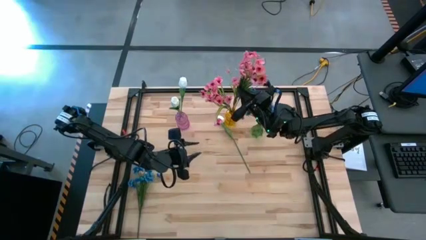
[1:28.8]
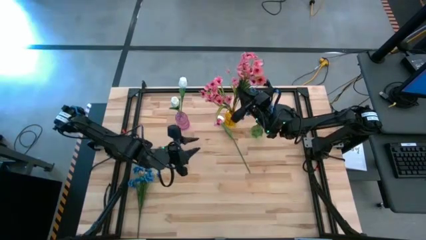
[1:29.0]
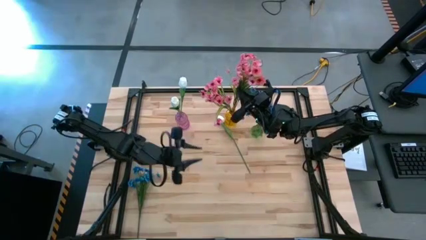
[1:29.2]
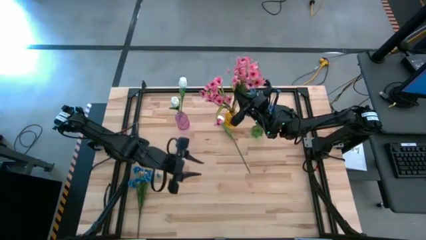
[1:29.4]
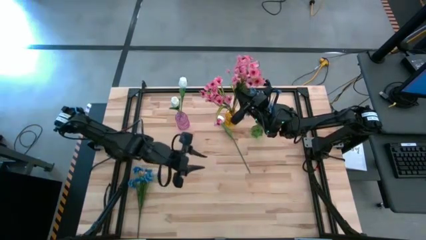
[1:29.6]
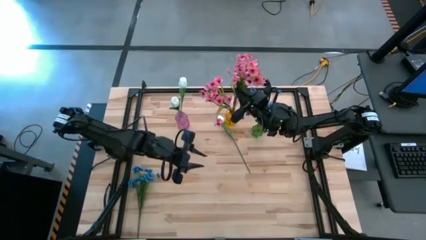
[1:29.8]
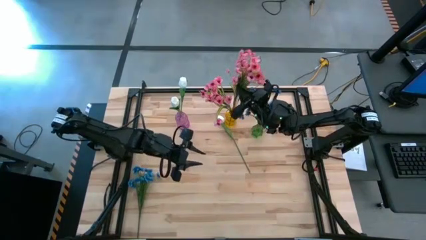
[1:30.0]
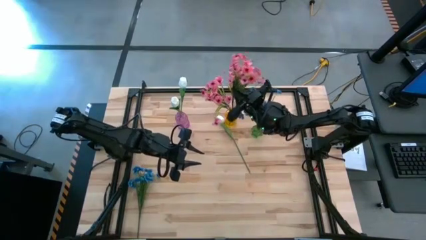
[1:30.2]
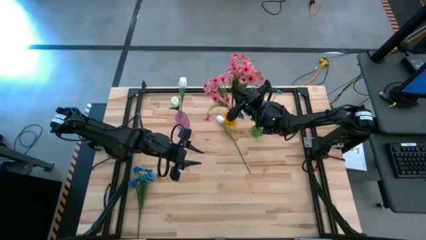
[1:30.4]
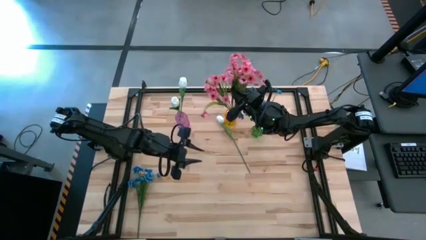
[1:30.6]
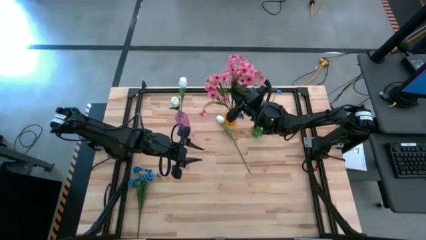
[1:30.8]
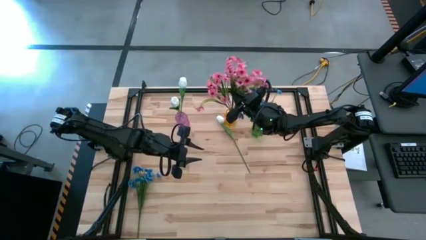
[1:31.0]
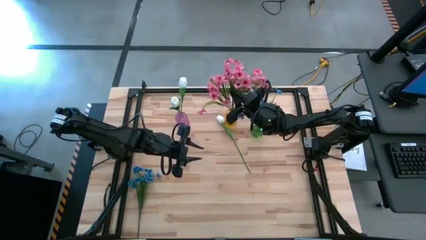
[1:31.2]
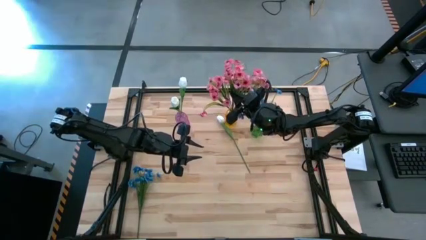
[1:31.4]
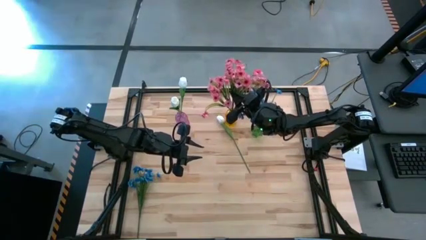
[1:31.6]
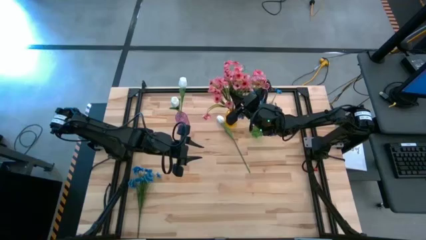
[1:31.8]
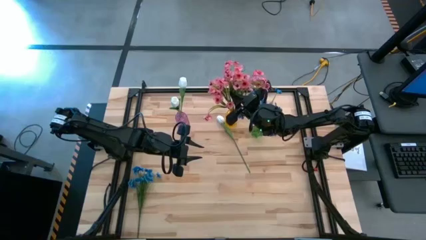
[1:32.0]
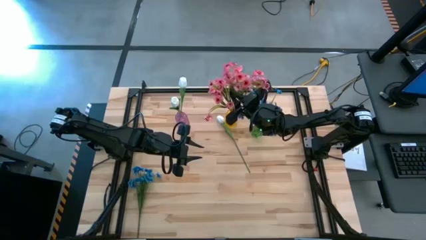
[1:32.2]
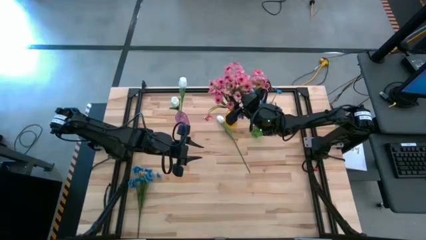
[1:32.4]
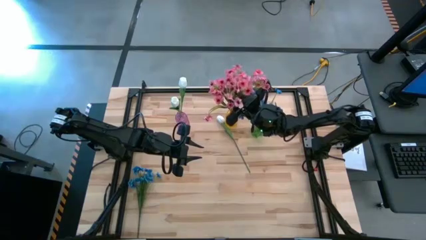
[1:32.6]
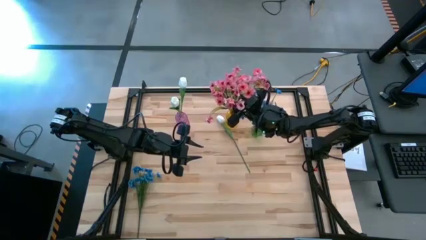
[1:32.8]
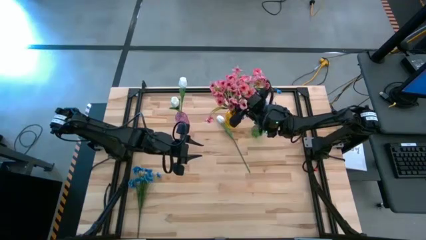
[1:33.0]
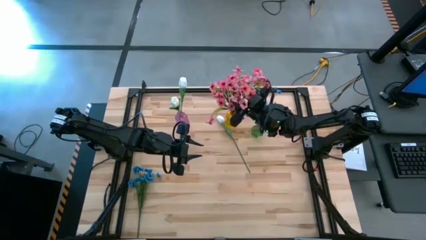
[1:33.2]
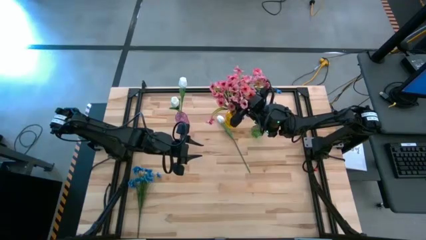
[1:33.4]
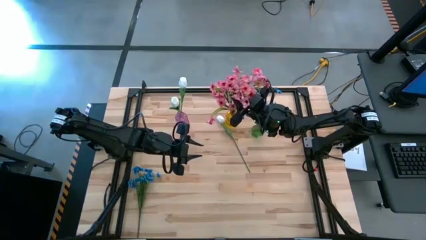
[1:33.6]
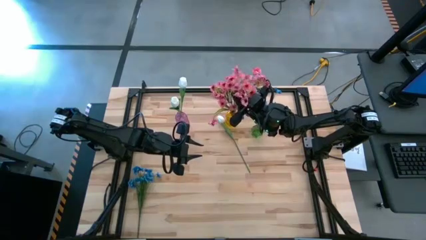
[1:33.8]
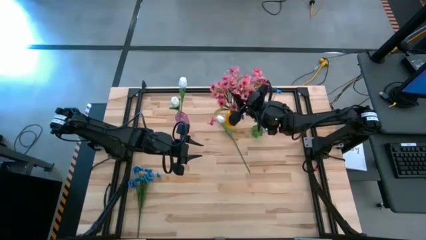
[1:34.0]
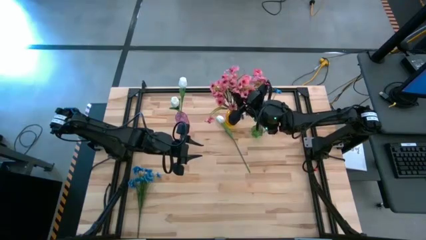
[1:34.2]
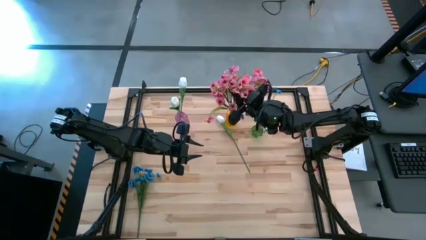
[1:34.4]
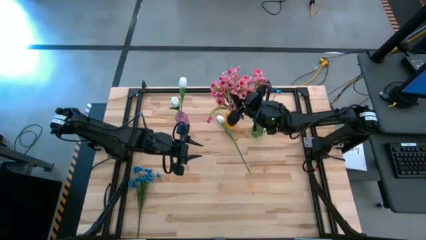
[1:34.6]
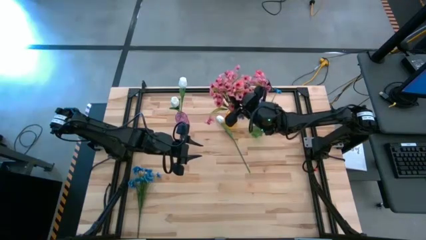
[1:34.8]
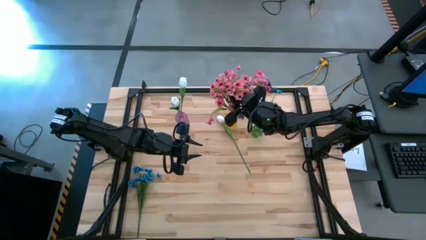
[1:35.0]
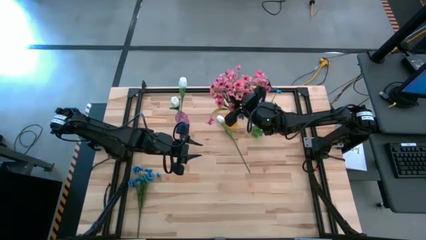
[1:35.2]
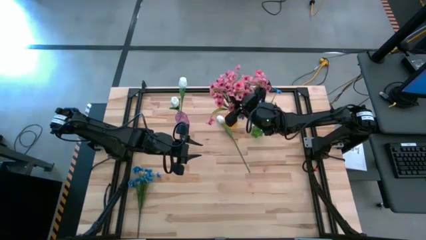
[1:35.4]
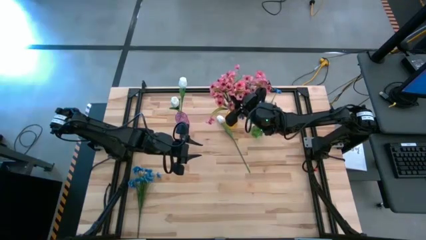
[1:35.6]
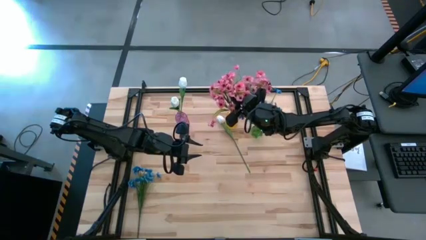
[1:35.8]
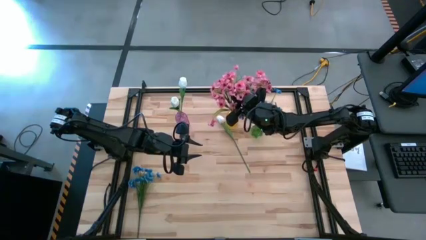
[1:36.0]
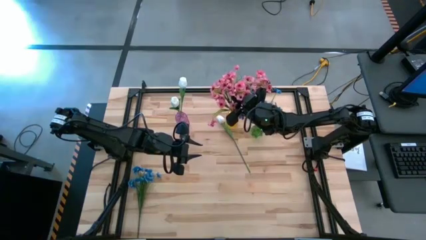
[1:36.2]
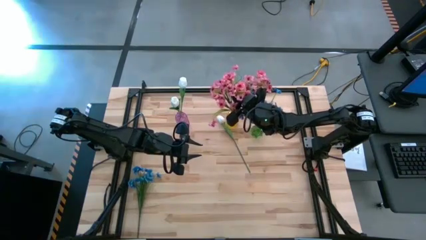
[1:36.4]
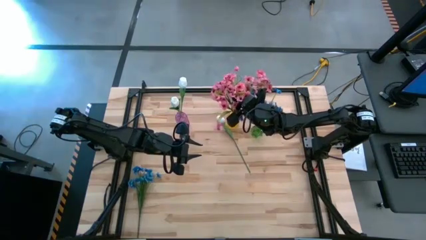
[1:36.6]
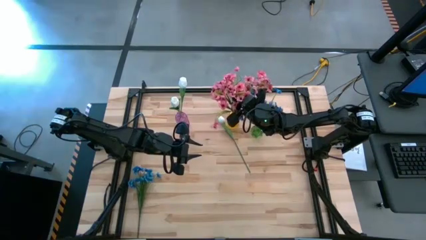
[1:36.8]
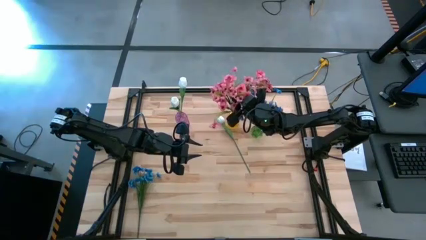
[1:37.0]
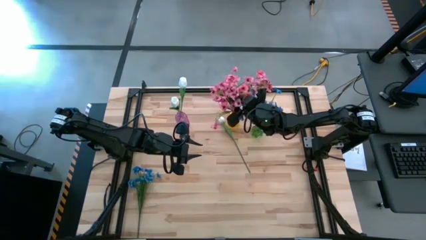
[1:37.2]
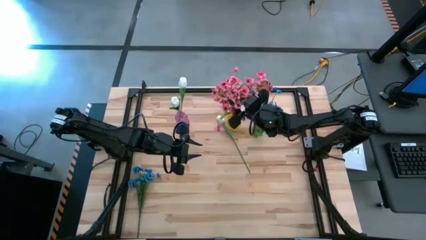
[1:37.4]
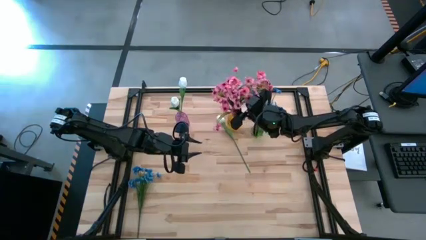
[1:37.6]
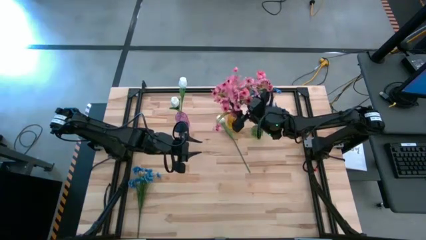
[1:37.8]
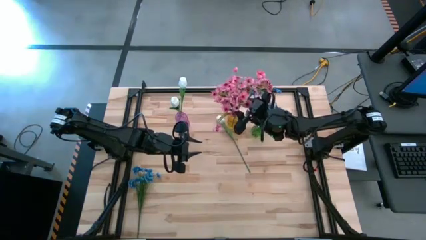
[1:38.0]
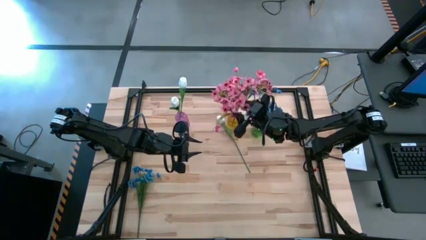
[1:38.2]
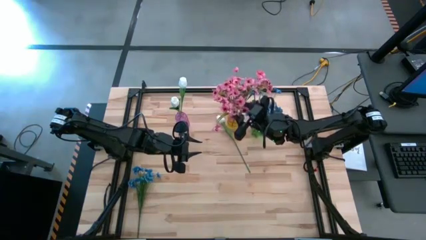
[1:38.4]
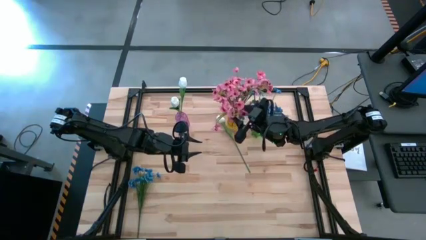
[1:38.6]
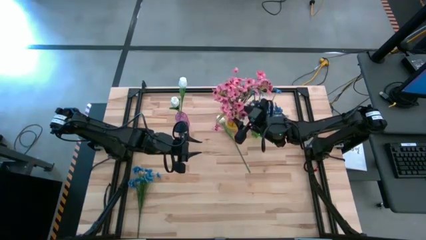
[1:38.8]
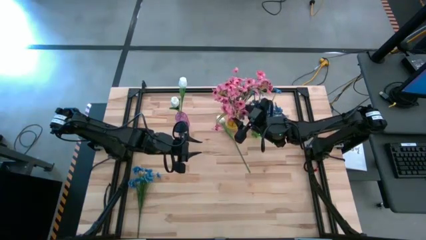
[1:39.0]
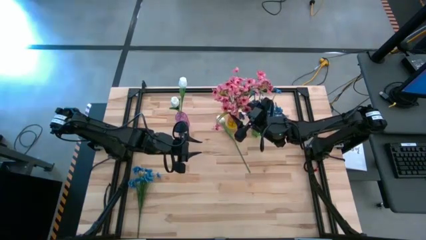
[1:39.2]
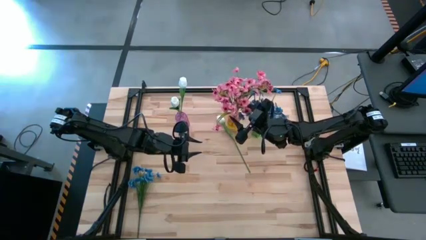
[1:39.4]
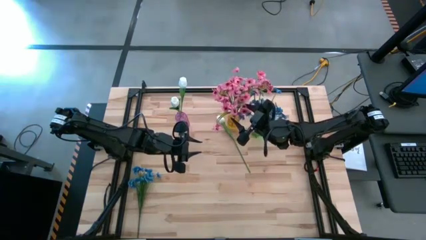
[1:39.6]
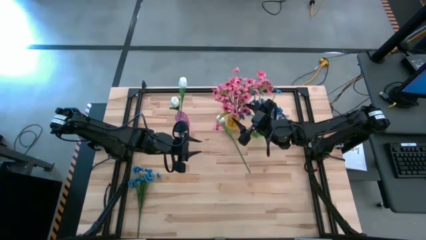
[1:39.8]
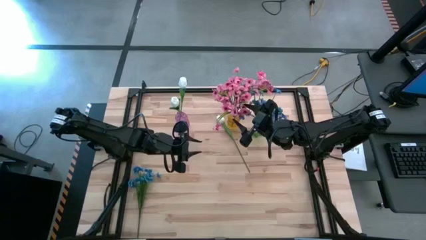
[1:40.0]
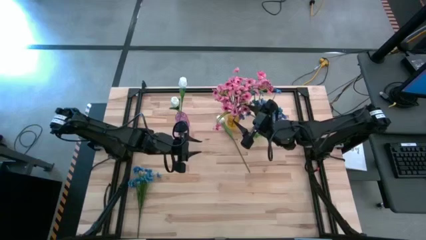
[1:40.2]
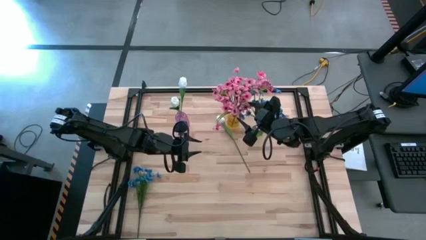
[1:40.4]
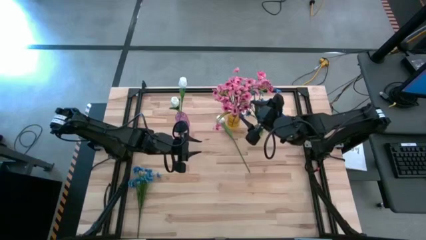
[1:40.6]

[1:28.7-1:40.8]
Task: Sort flowers into vase by color
Put the pink flowers into the yellow vase

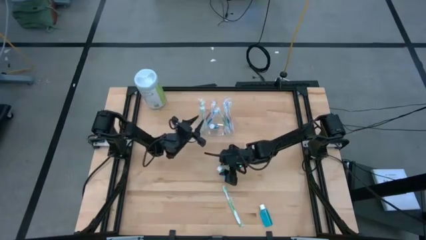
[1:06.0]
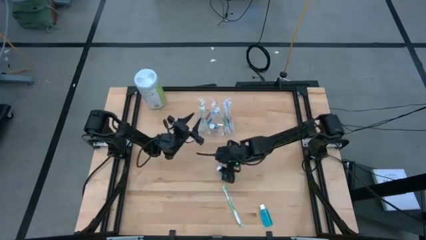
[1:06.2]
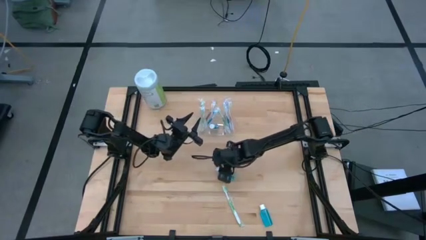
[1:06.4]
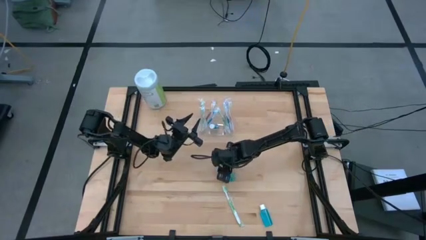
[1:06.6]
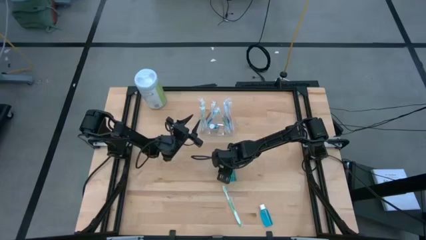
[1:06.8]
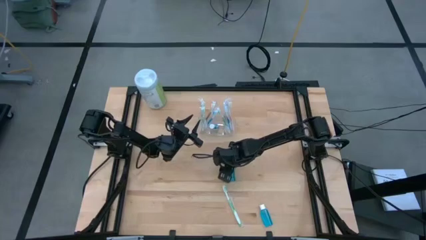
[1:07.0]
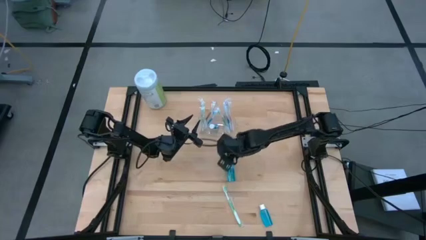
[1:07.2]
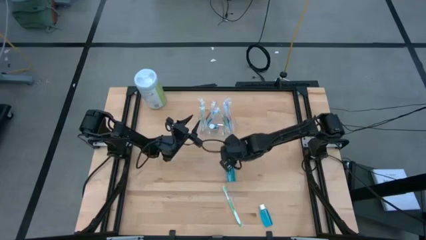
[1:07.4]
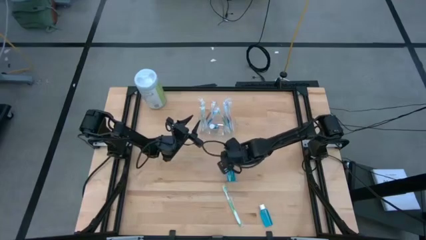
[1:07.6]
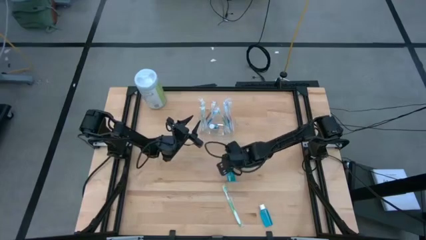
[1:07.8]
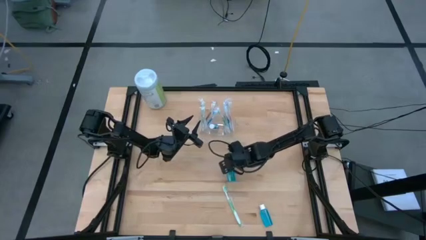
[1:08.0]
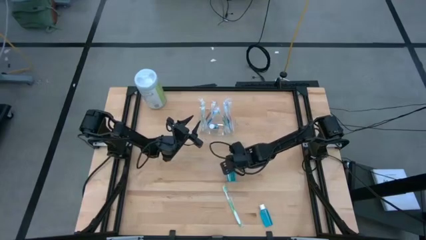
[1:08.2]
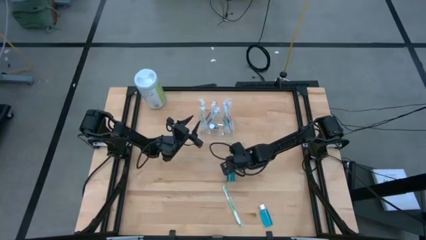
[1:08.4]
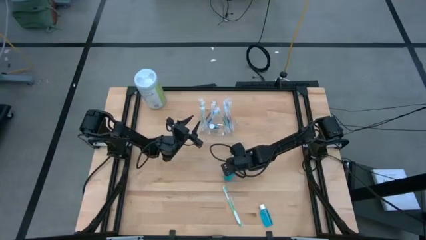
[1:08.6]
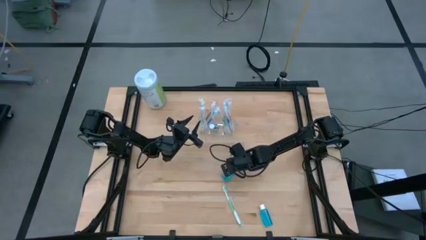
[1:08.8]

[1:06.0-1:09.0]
Task: Pick & Place toothbrushing station
Put the blue mouthwash in the middle of the transparent organizer

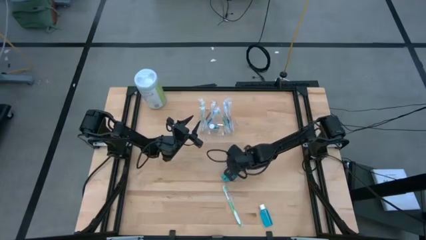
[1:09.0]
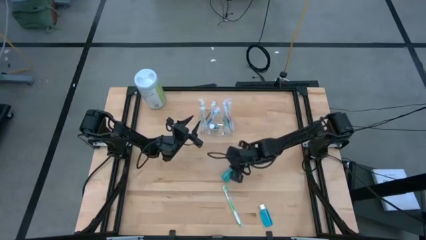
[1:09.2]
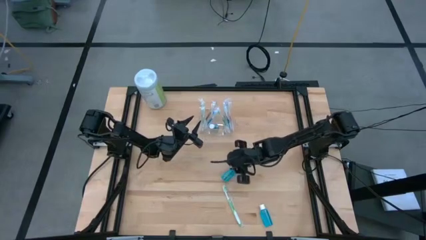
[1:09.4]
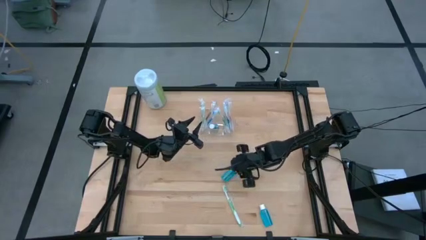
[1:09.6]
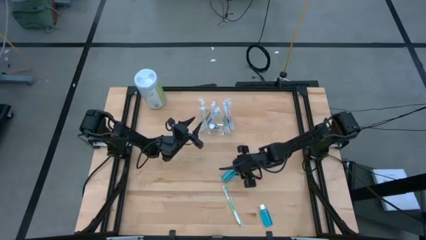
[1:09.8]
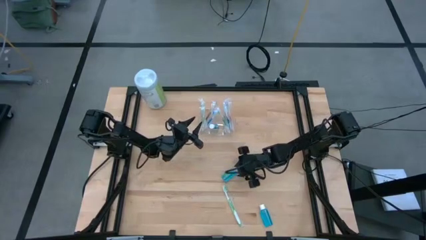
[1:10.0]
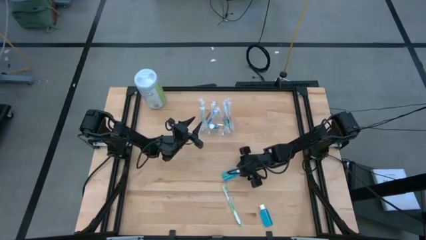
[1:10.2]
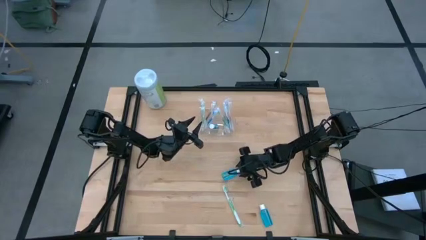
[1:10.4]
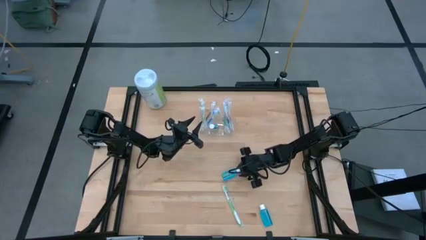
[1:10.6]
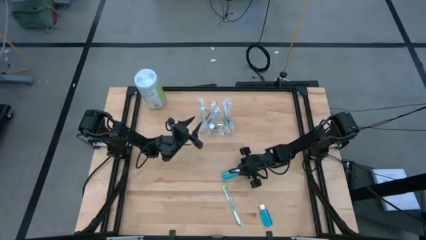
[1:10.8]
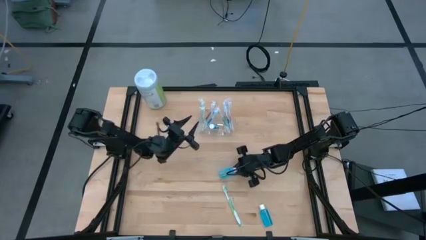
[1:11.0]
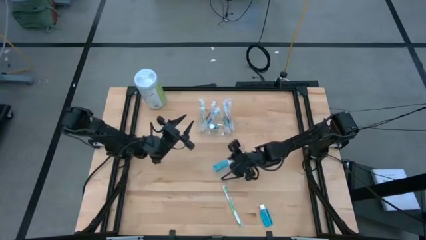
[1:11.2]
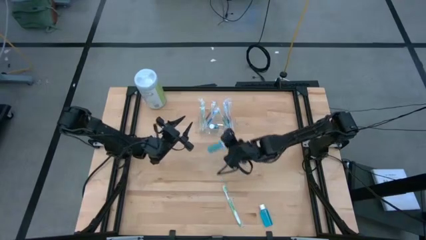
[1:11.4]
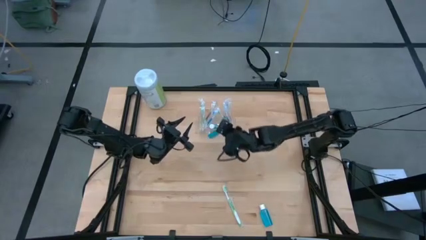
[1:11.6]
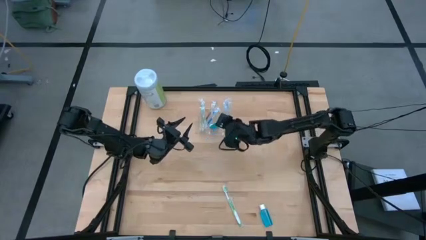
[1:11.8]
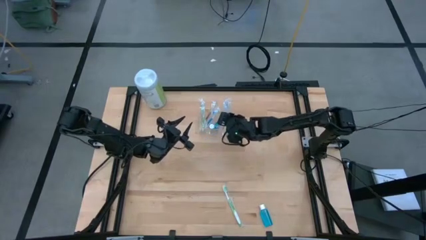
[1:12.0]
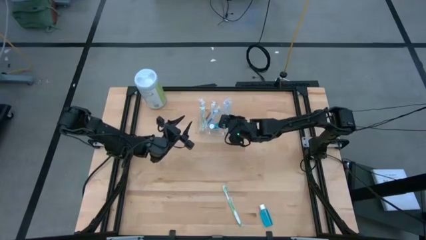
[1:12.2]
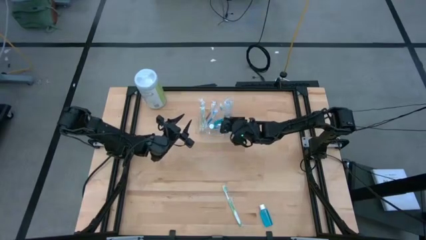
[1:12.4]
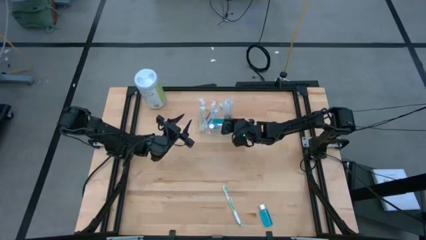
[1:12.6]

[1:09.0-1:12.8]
Put the blue mouthwash in the middle of the transparent organizer
